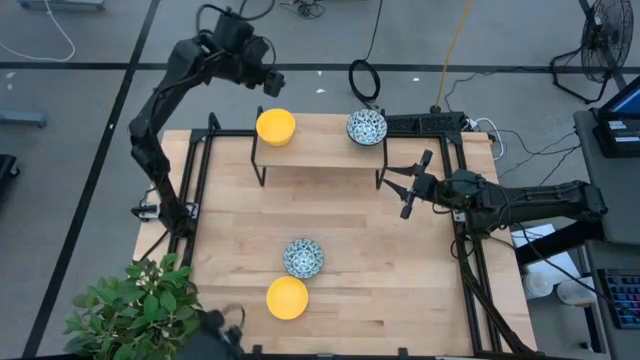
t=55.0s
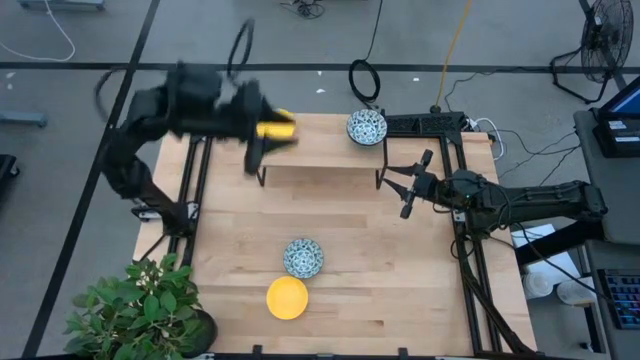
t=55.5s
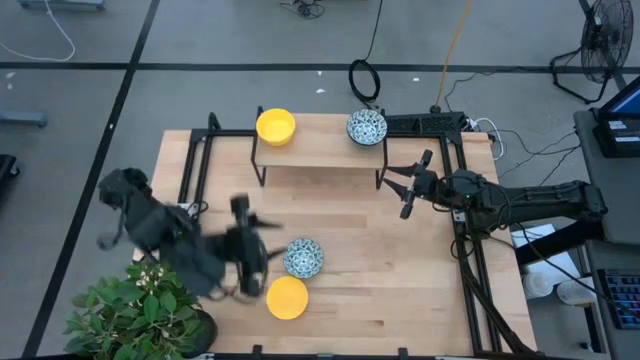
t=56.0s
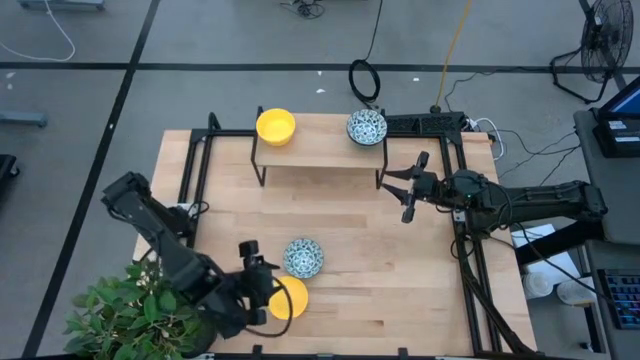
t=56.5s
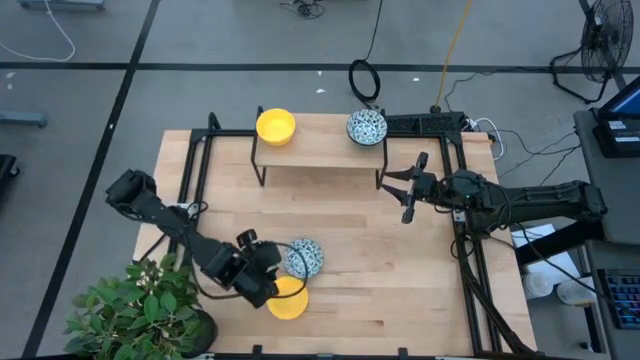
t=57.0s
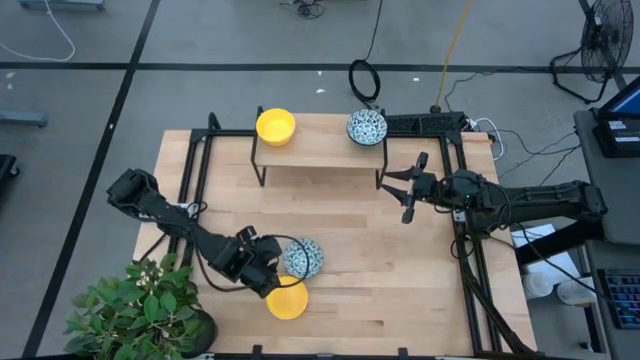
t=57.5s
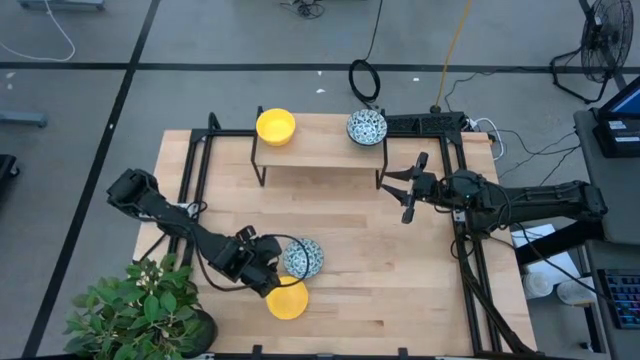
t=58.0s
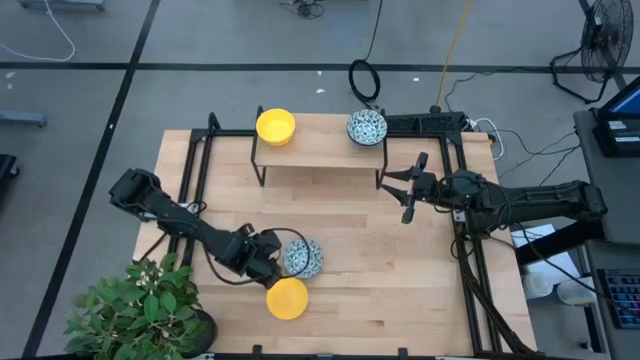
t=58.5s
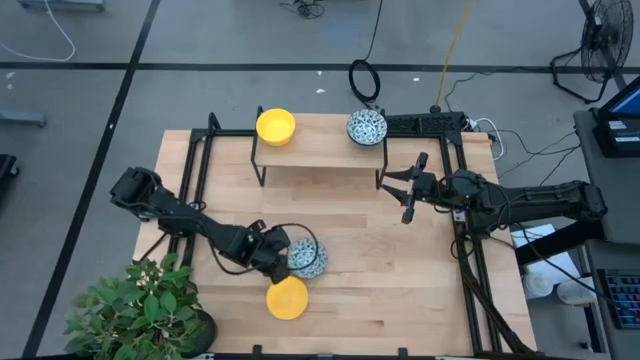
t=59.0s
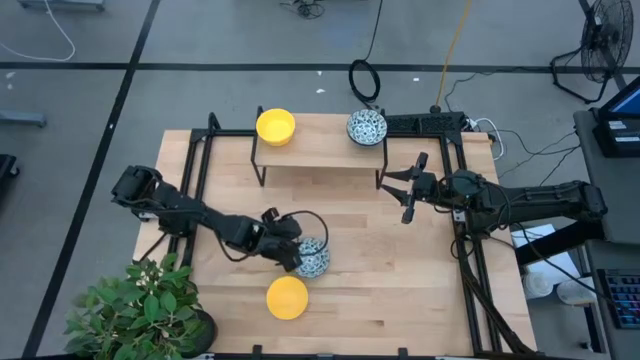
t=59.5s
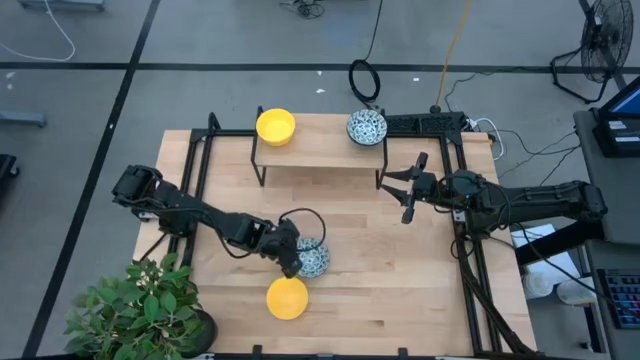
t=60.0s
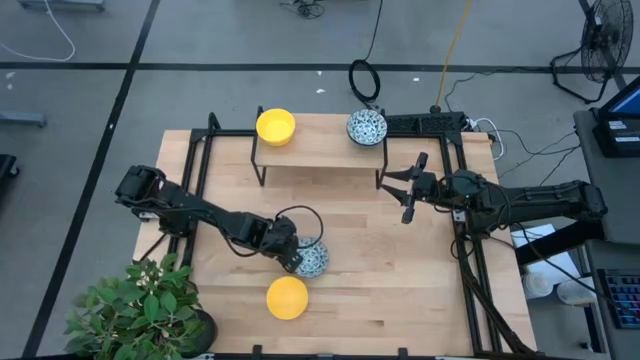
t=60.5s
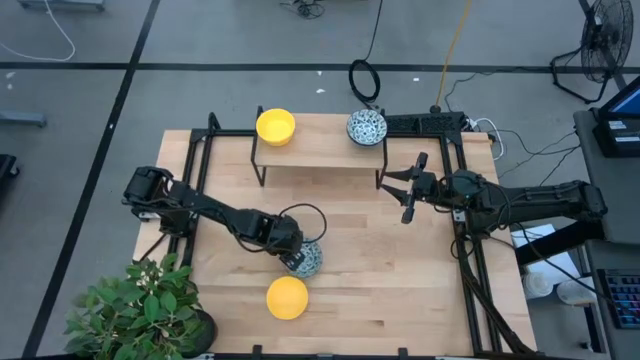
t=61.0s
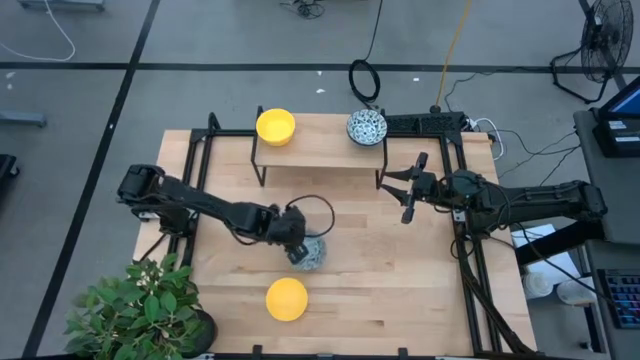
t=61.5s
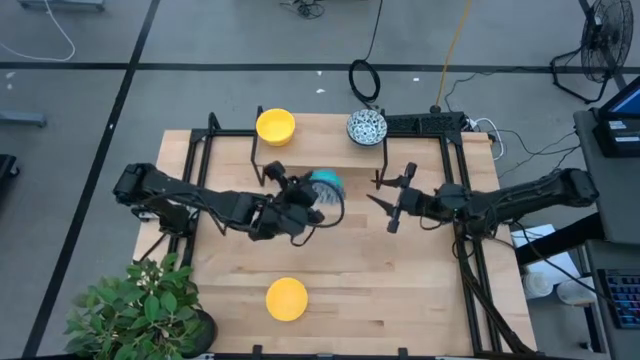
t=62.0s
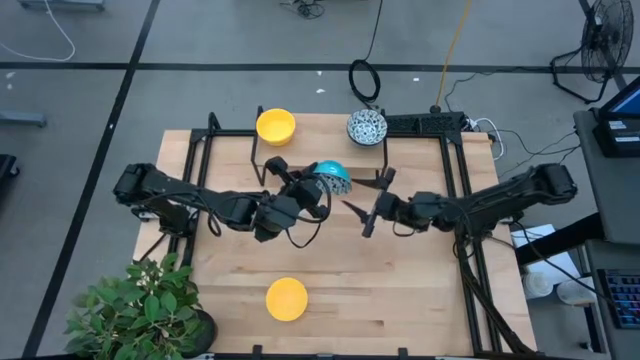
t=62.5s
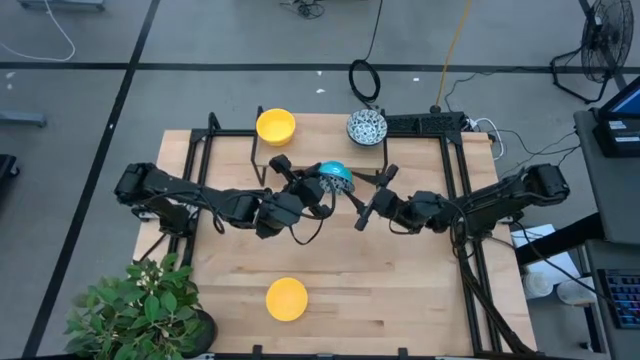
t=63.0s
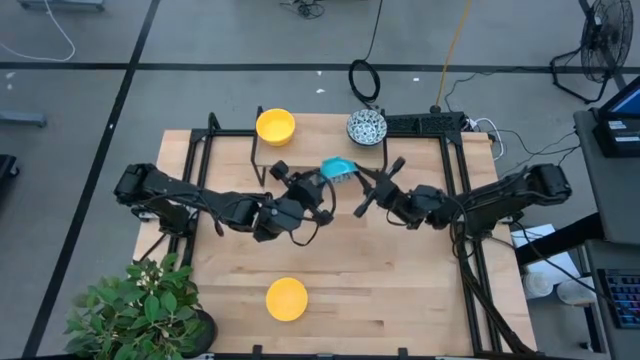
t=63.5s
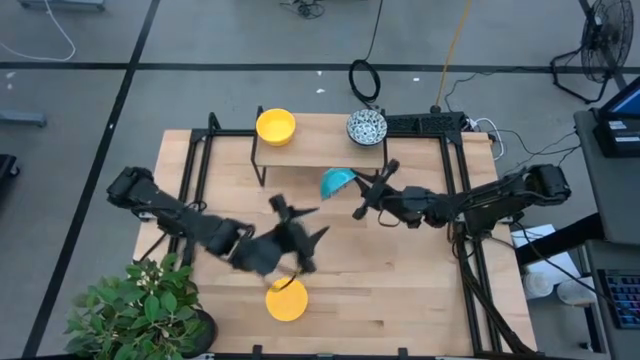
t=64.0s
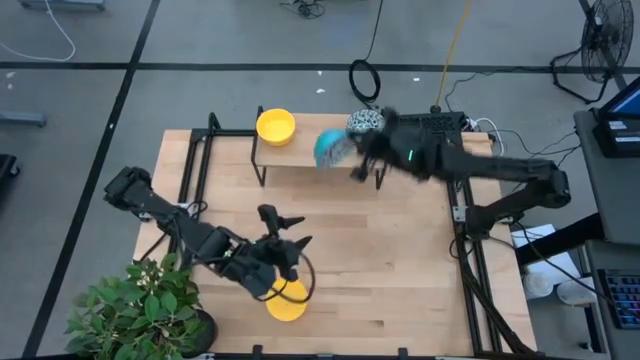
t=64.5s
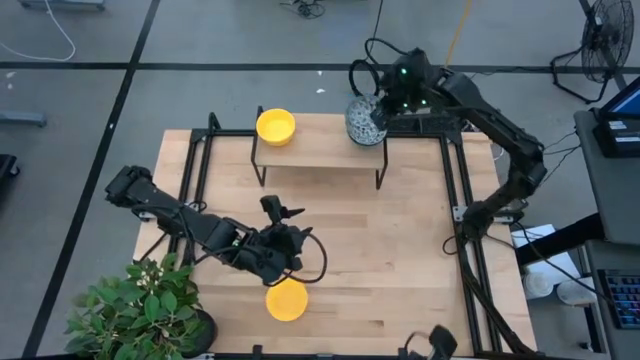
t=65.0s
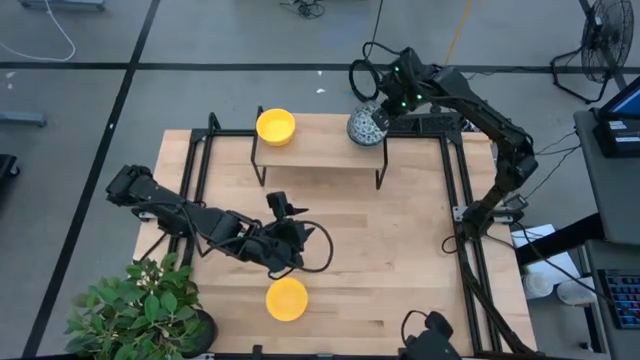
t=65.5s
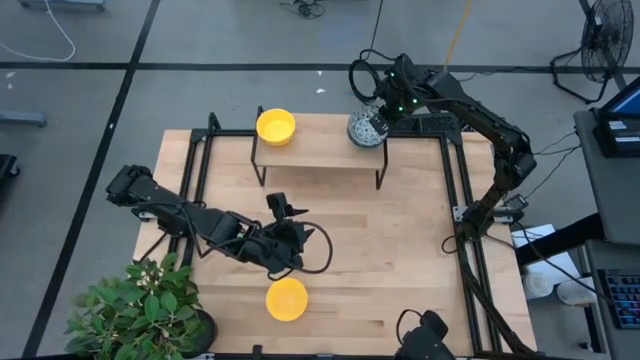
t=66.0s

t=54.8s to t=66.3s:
Task: Pick & Place Mini bowls
Stack the blue bowl on top of the stacked blue bowls on the shelf

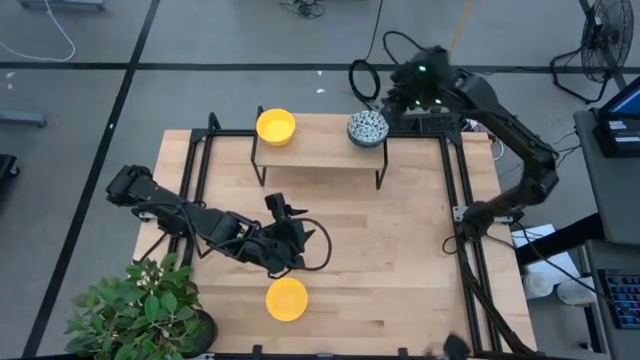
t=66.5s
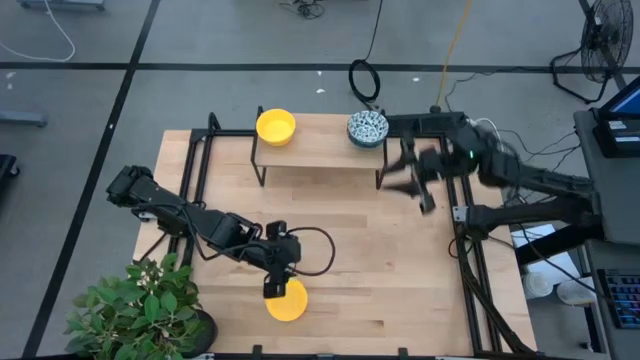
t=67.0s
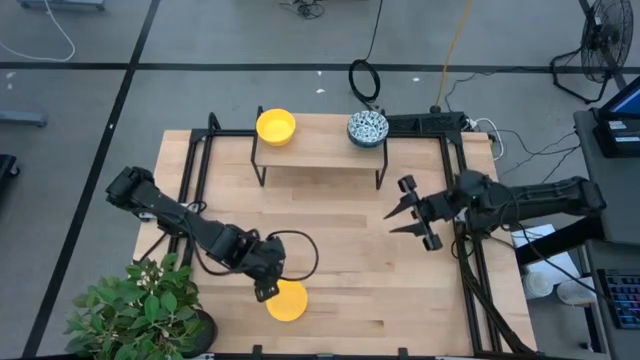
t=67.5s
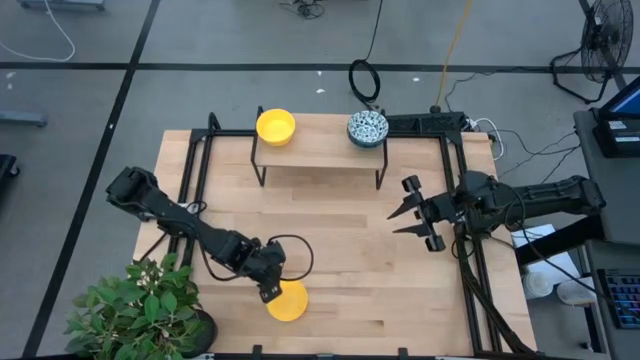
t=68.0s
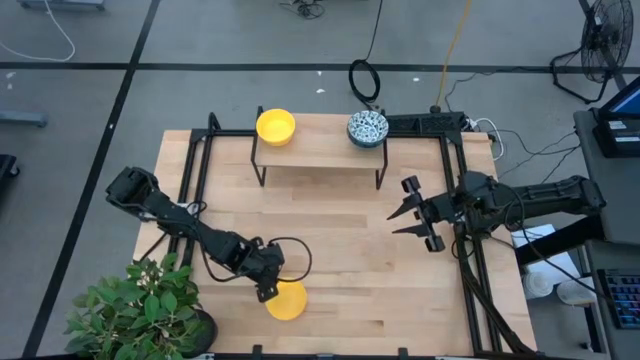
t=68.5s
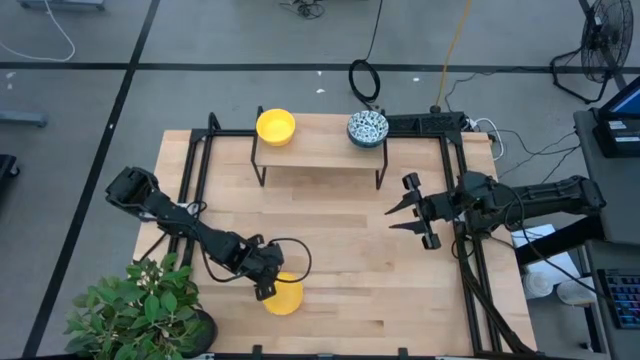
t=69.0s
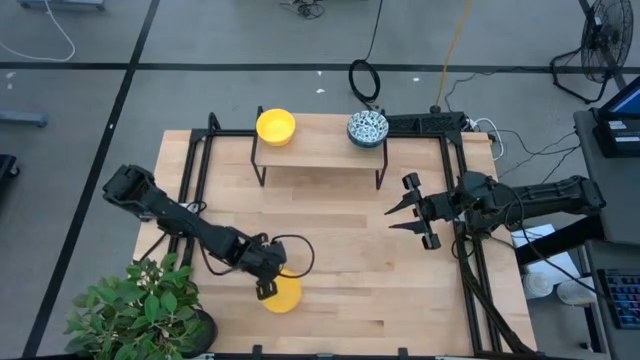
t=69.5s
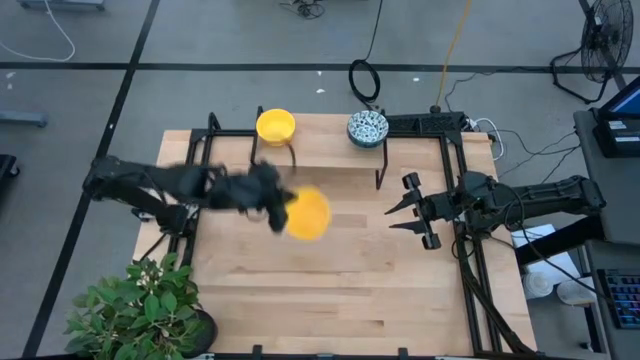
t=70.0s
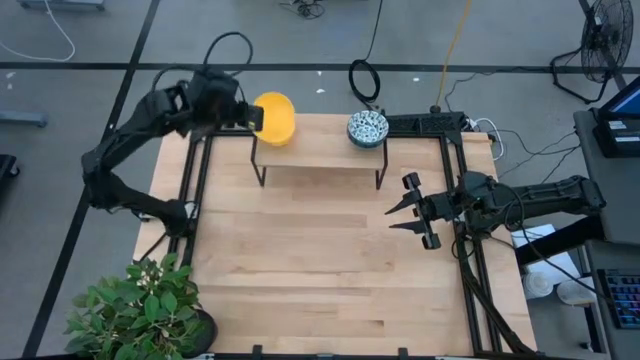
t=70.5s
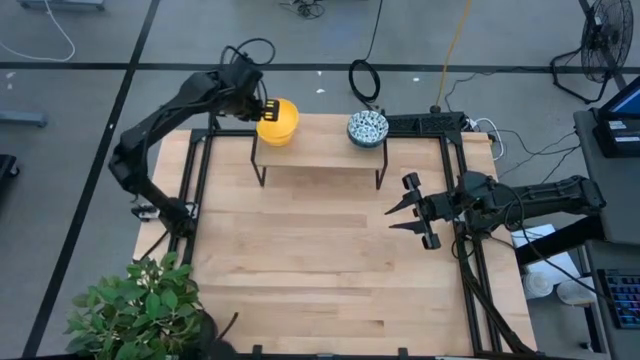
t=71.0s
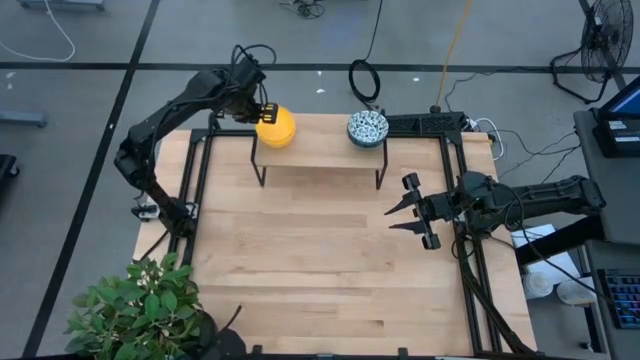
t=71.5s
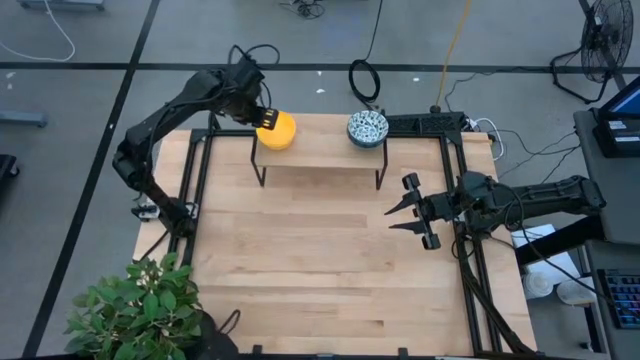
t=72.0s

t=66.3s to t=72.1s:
Stack the yellow bowl on top of the stacked yellow bowls on the shelf

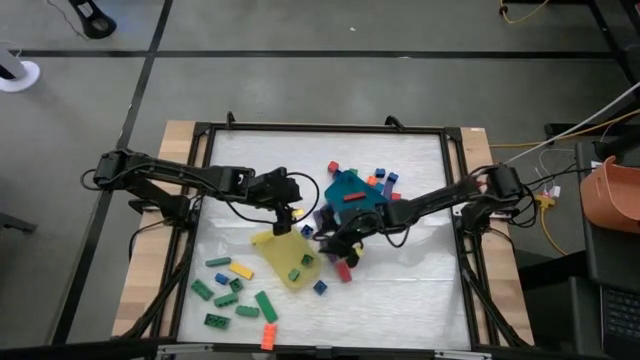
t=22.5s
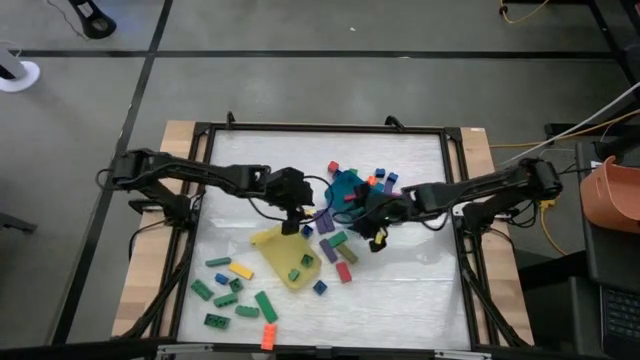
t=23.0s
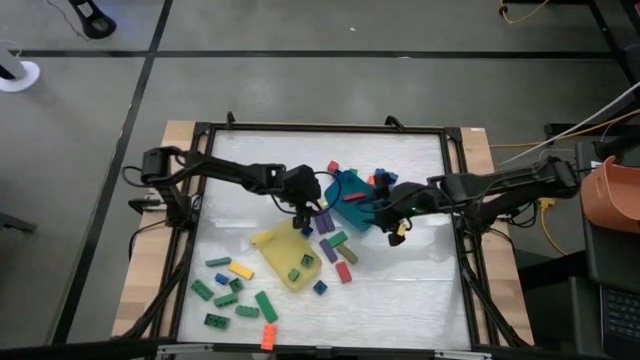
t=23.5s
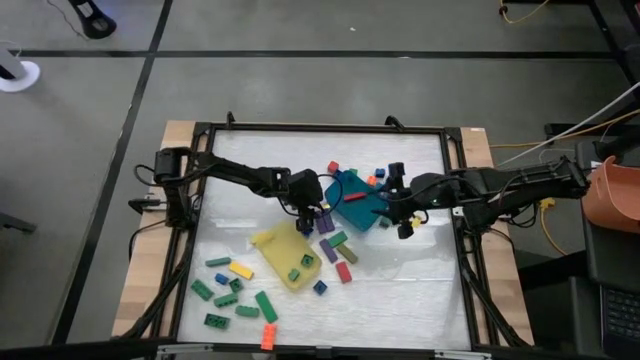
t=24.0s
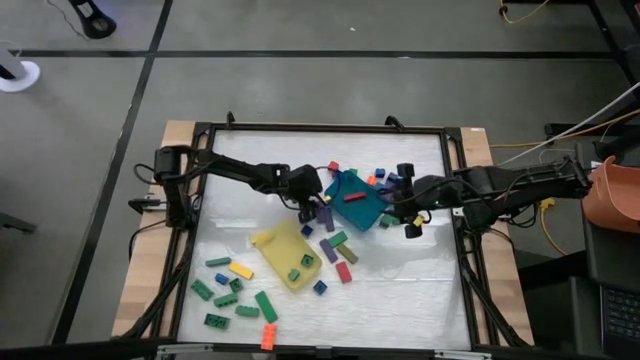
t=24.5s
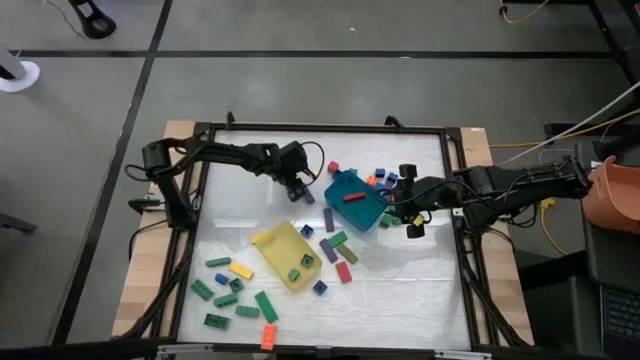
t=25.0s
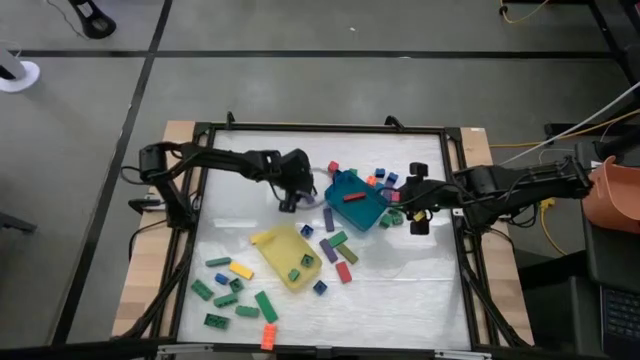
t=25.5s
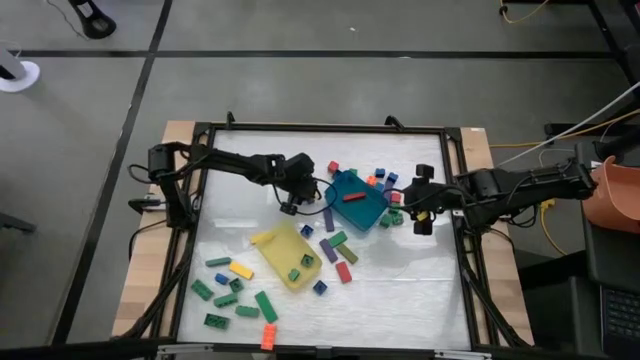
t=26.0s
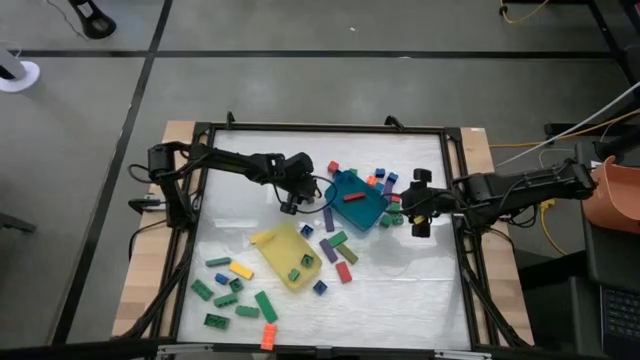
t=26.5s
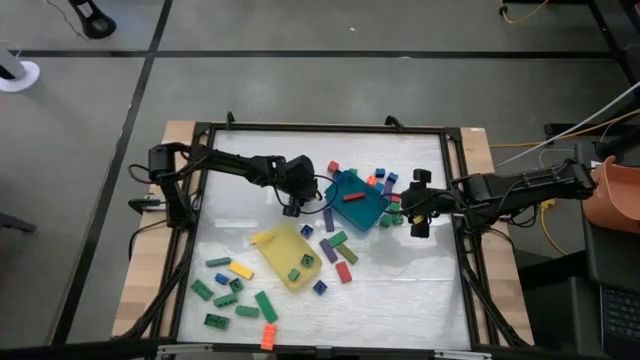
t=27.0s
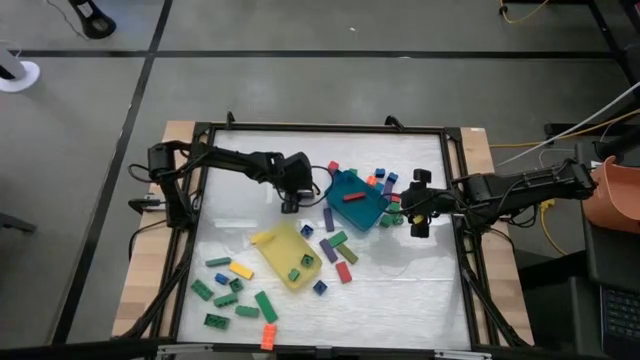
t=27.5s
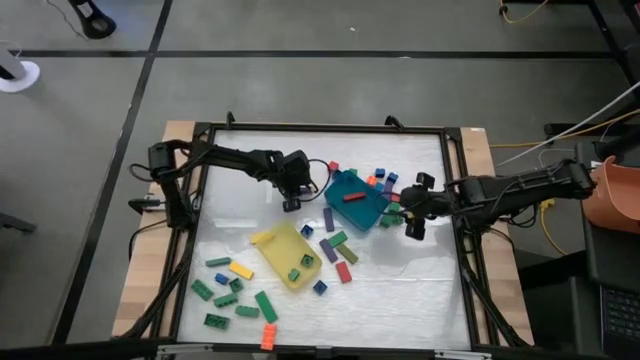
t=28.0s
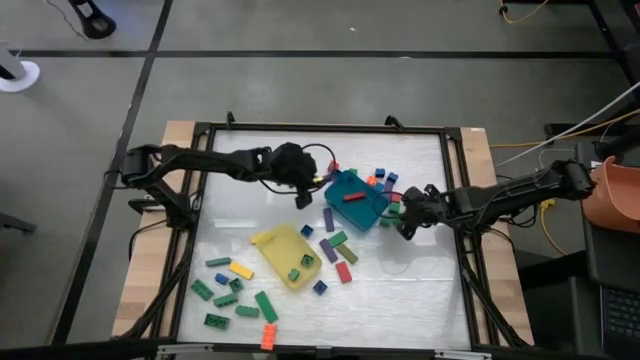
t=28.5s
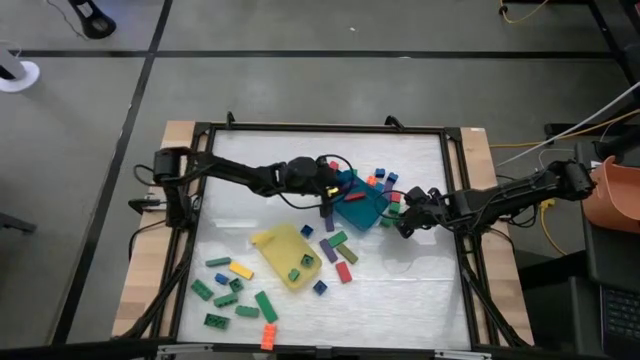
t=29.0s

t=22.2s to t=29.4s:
Task: Sort blocks by size
Put the large violet wooden block into the blue bin
